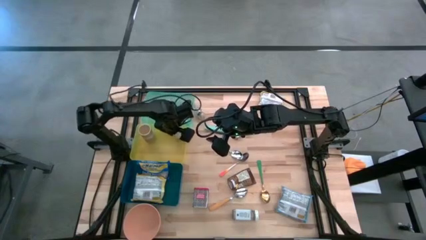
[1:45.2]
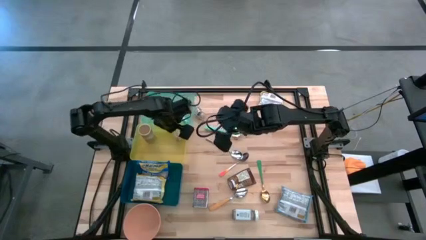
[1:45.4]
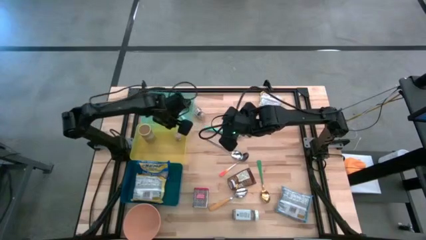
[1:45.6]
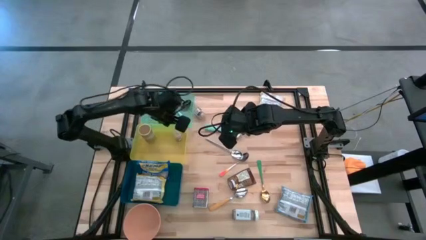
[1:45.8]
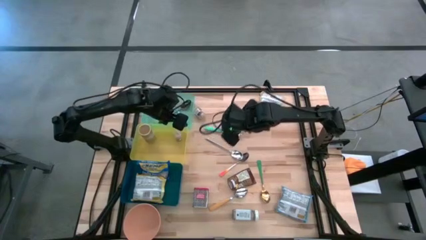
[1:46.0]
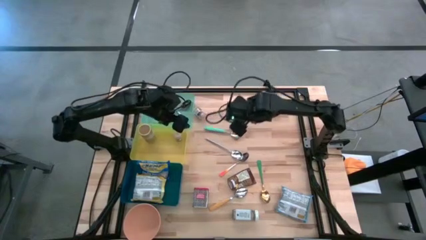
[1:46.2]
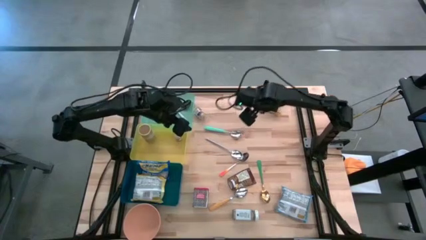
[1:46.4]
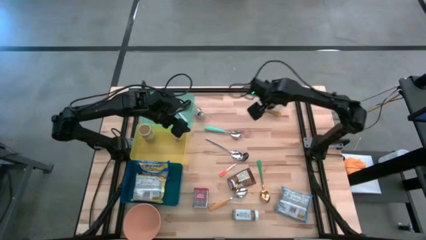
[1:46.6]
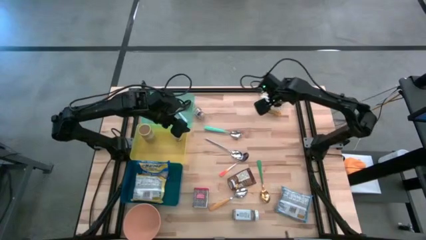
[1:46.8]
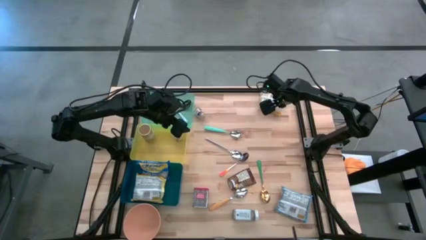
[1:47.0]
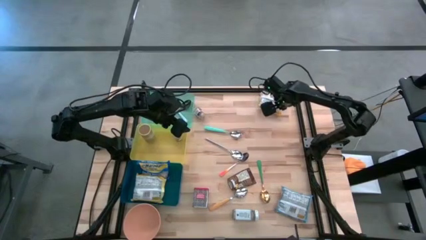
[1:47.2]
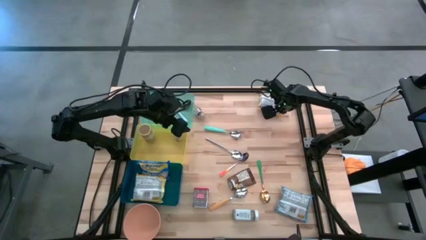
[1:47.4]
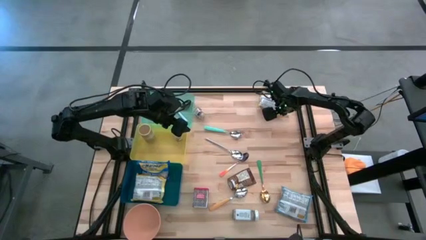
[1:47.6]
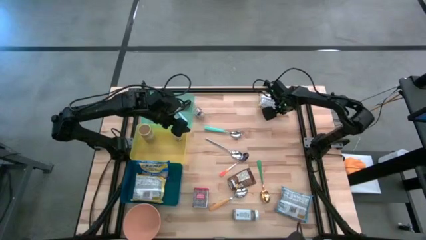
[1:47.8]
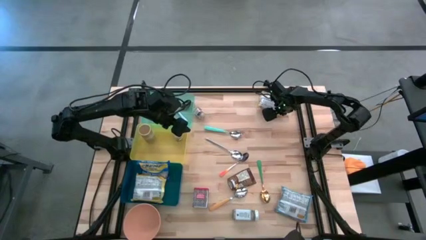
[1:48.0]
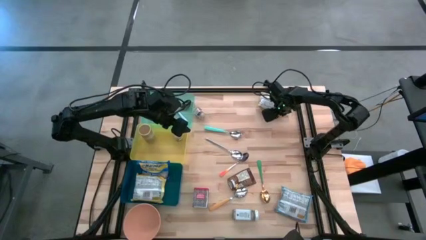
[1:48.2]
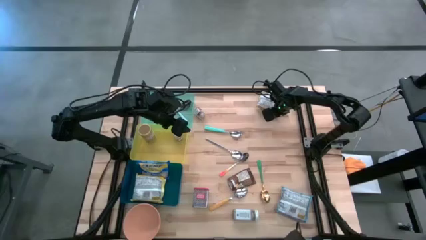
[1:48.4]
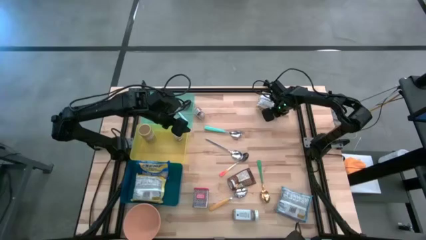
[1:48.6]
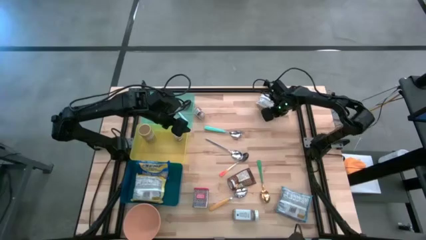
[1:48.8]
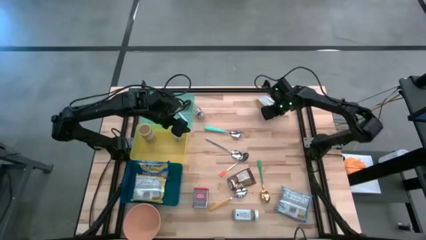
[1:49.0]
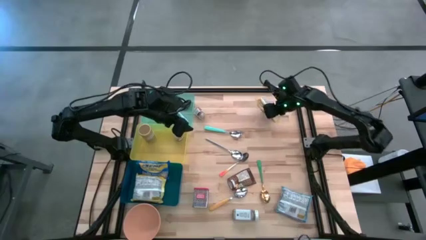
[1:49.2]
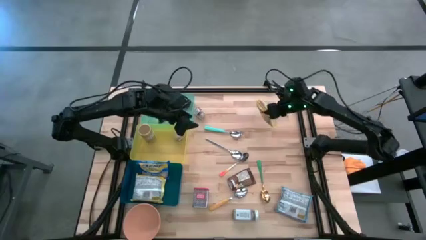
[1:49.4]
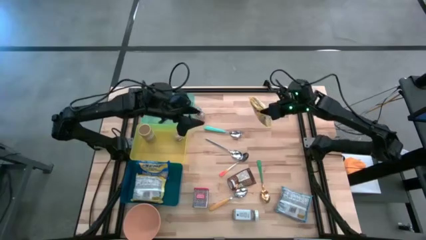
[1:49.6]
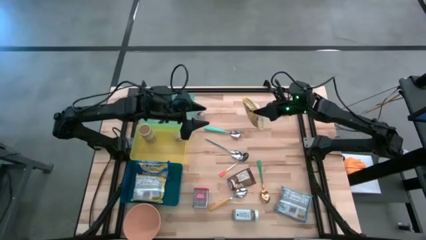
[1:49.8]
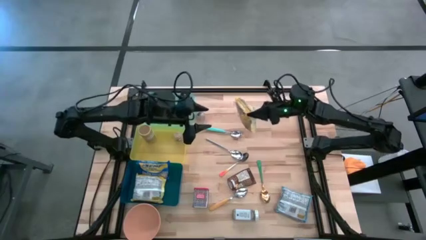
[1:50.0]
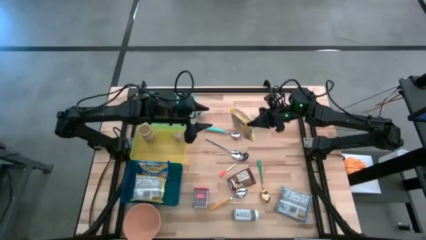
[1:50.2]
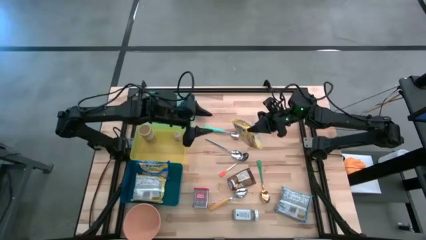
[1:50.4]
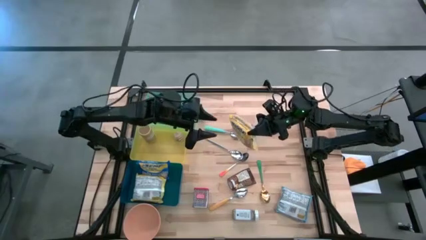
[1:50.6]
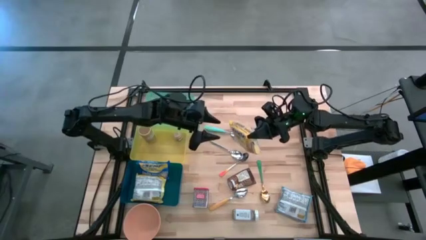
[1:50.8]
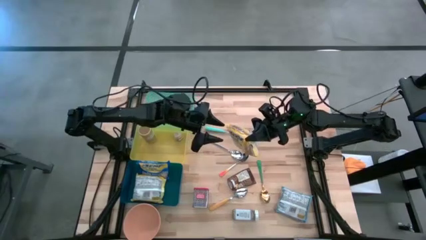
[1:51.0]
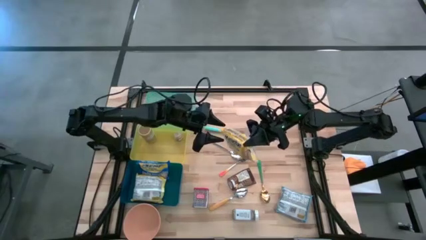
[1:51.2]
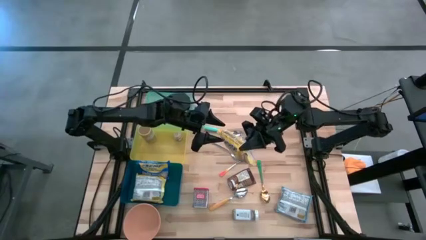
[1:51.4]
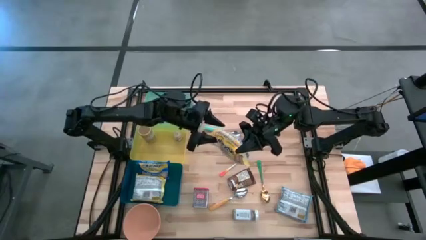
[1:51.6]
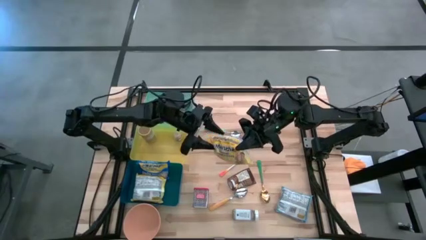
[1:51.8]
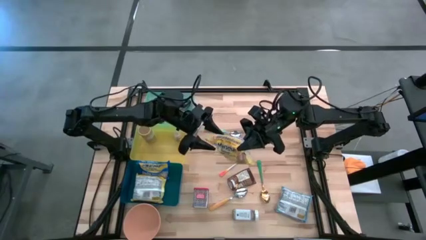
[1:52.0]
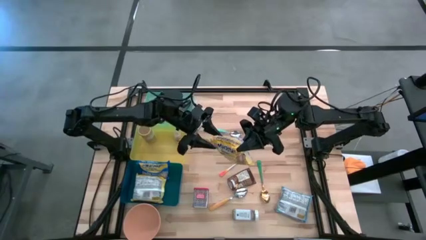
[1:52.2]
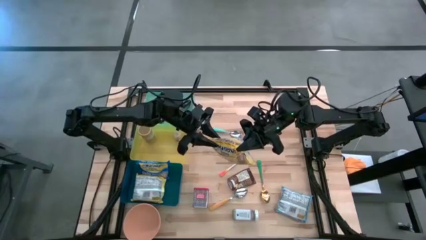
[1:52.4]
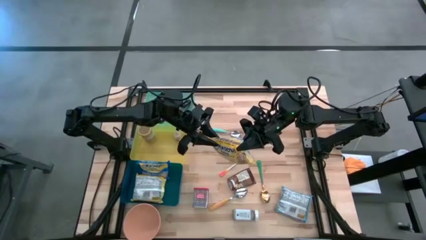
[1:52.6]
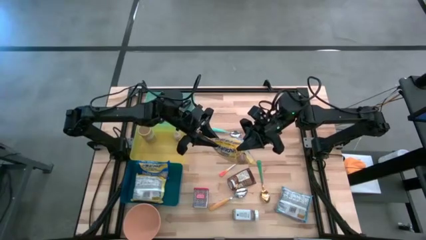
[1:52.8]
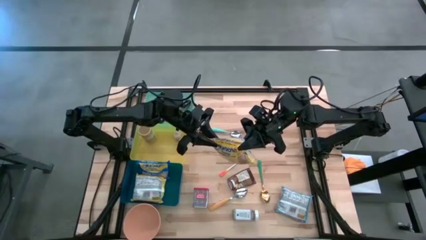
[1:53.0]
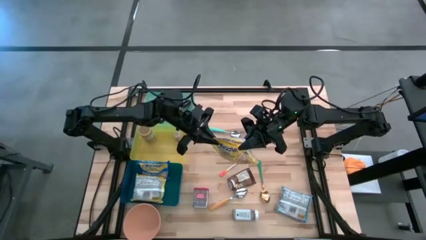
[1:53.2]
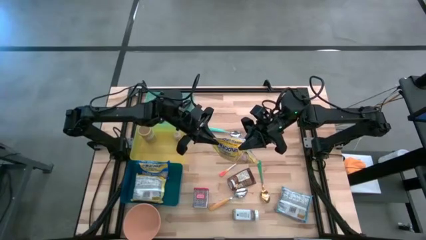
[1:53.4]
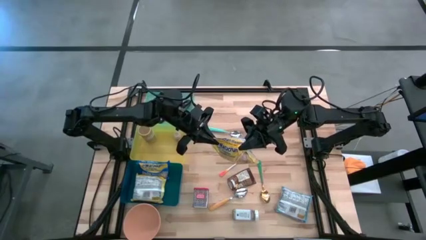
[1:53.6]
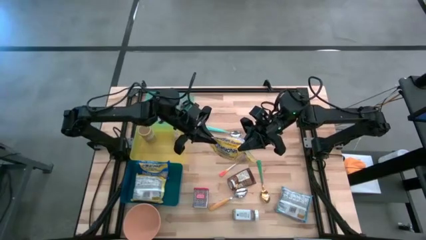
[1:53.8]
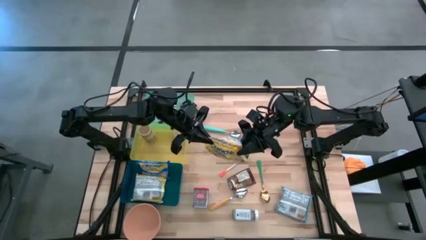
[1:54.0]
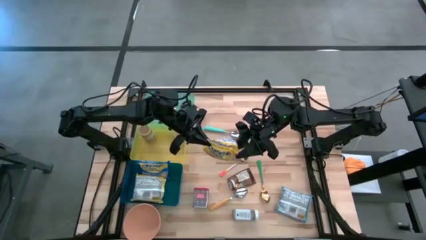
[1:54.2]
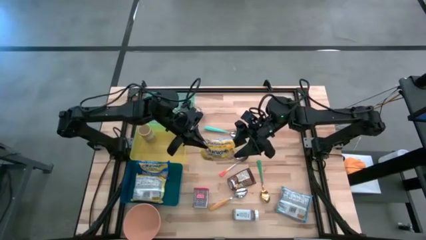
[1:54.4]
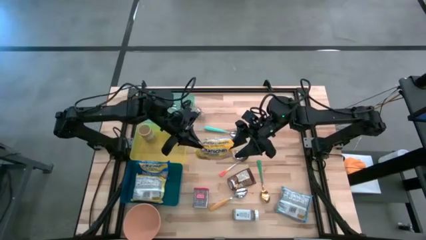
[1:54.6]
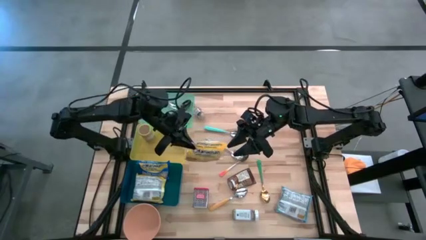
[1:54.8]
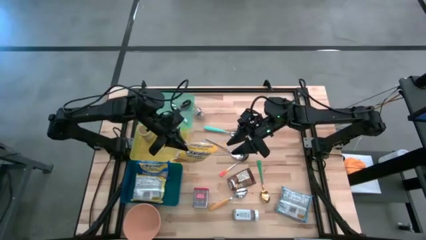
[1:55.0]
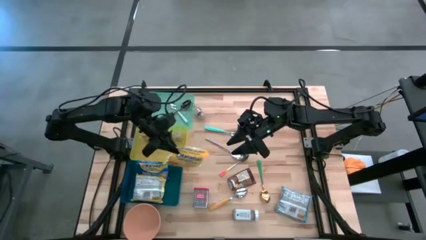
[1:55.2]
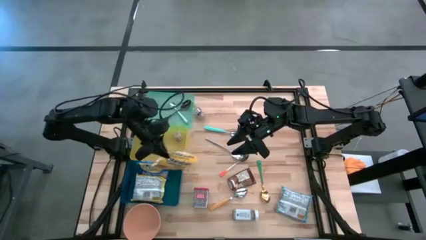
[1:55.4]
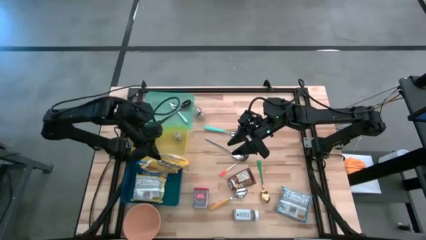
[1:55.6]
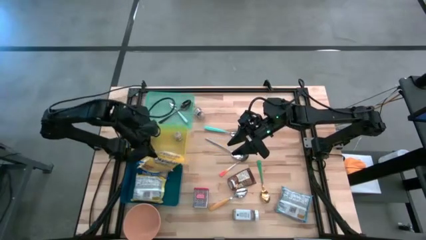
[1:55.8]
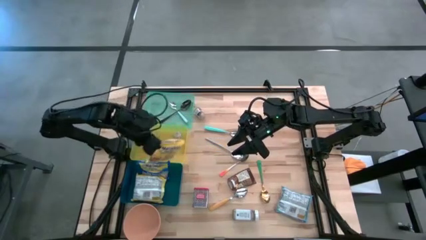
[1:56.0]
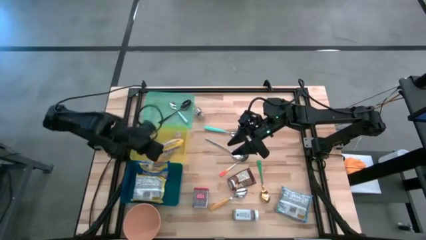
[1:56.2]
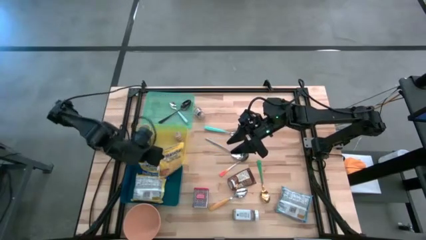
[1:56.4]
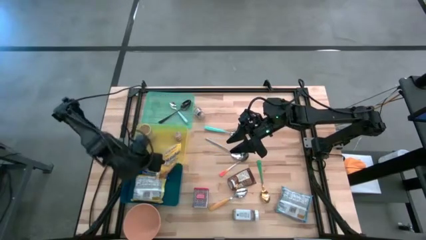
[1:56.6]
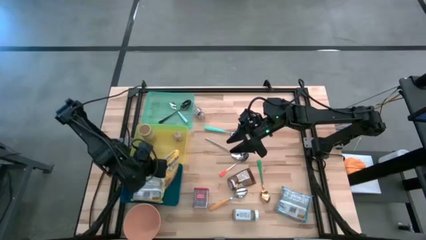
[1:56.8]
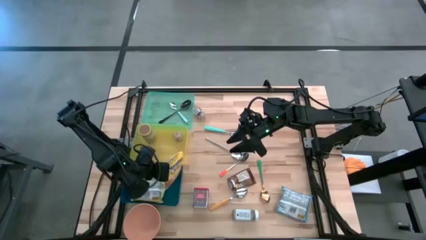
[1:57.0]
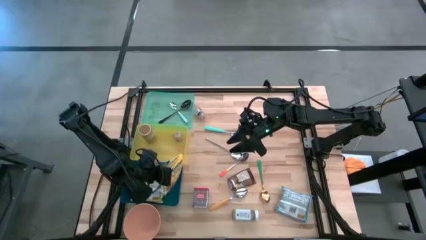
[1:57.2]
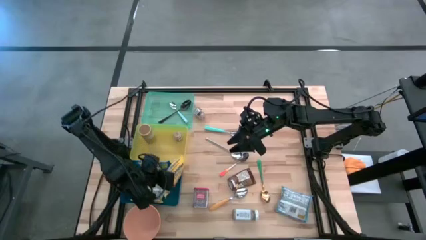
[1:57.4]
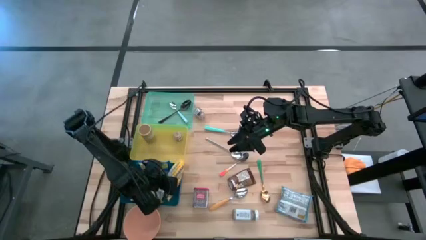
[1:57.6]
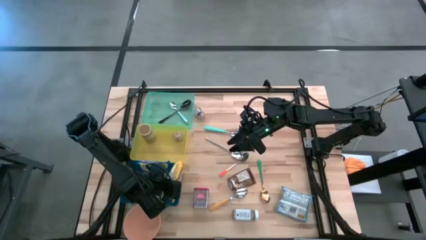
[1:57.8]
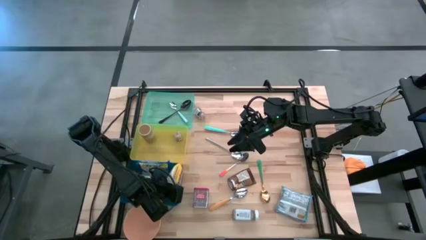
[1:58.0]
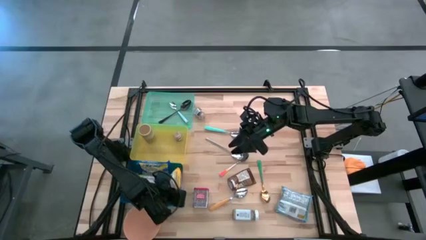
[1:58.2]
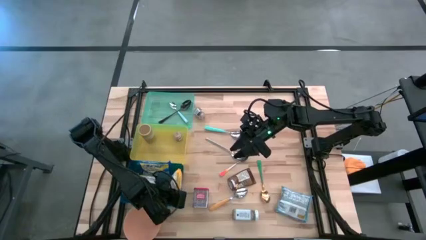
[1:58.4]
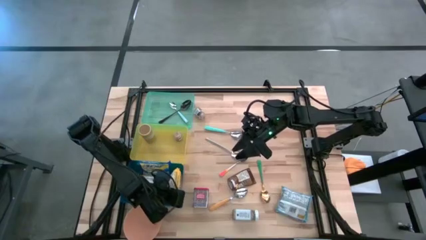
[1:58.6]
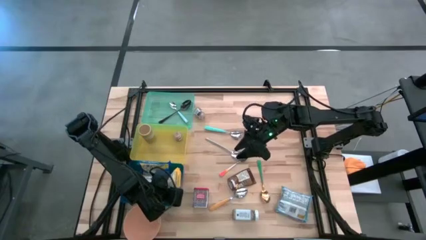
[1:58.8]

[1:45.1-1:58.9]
Put the yellow noodle pack into the blue bin
